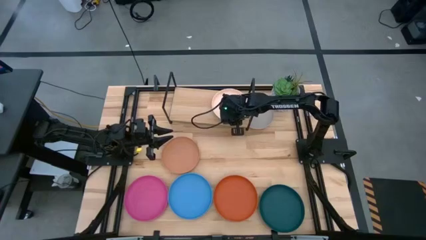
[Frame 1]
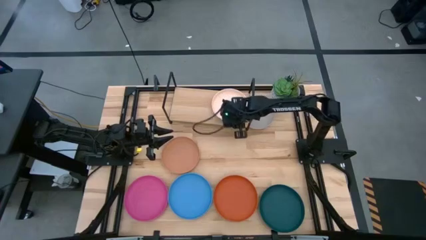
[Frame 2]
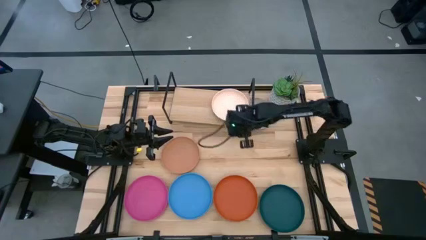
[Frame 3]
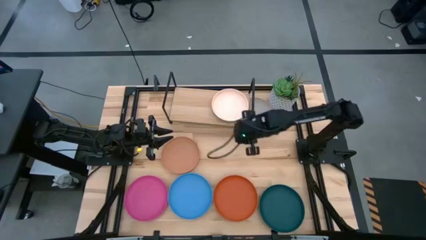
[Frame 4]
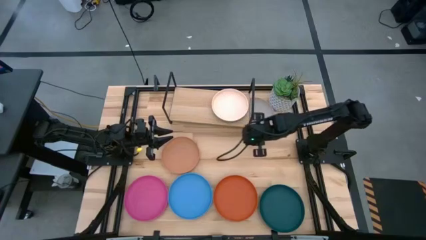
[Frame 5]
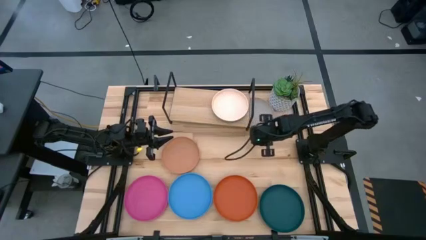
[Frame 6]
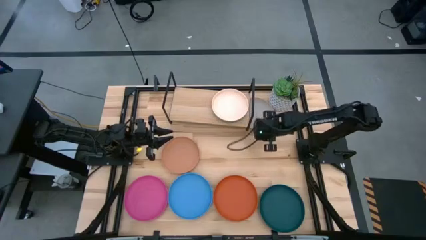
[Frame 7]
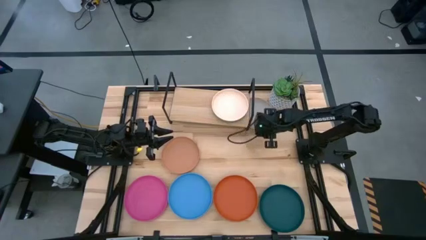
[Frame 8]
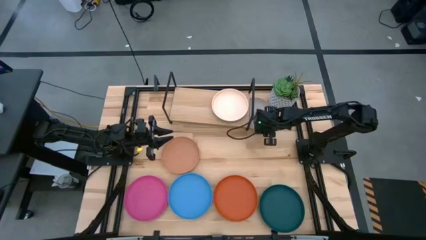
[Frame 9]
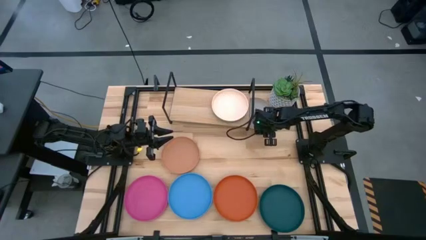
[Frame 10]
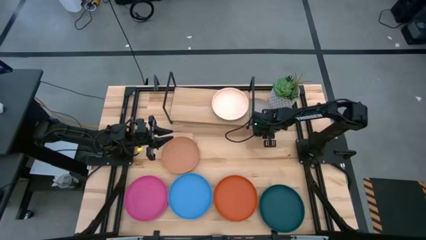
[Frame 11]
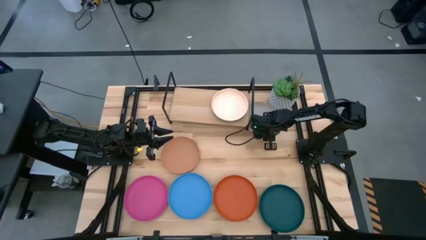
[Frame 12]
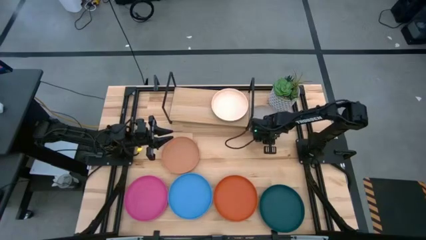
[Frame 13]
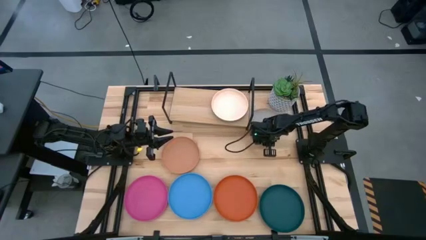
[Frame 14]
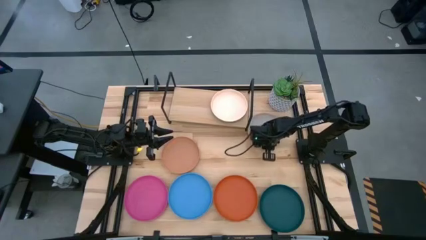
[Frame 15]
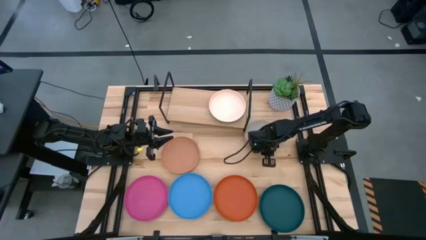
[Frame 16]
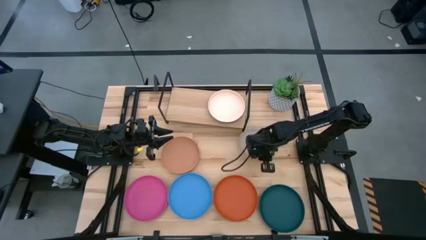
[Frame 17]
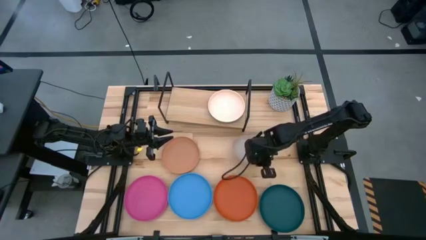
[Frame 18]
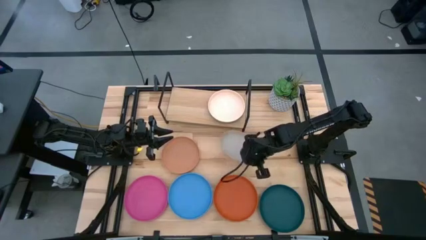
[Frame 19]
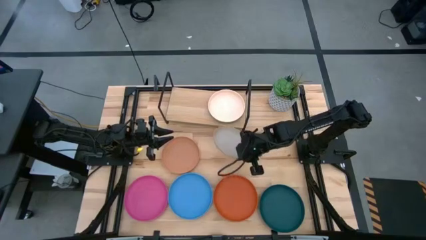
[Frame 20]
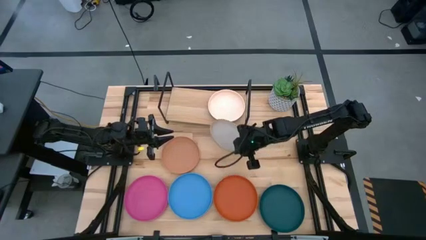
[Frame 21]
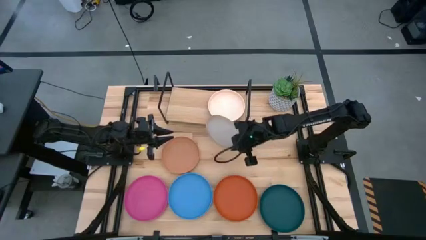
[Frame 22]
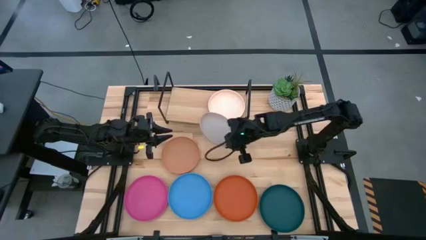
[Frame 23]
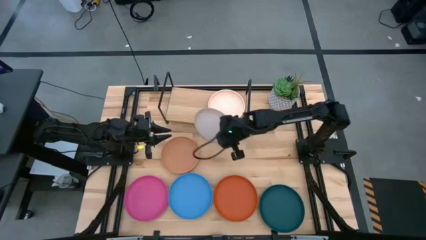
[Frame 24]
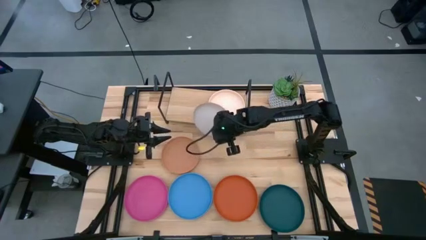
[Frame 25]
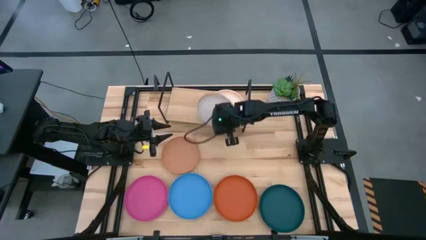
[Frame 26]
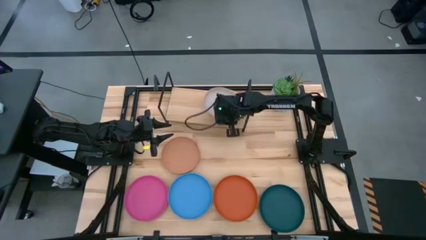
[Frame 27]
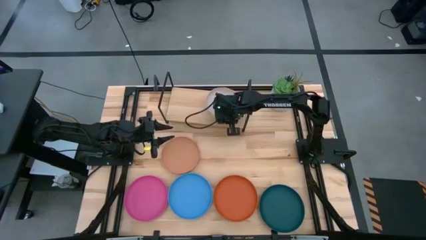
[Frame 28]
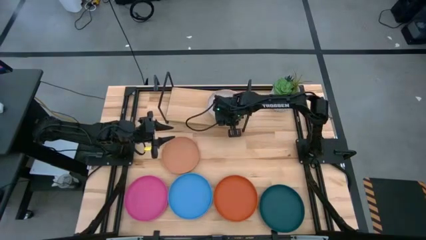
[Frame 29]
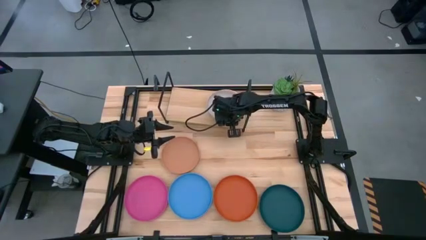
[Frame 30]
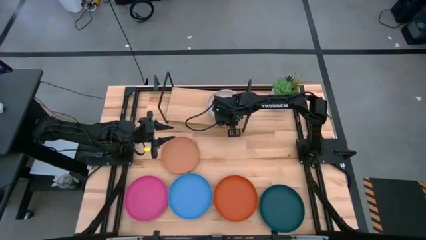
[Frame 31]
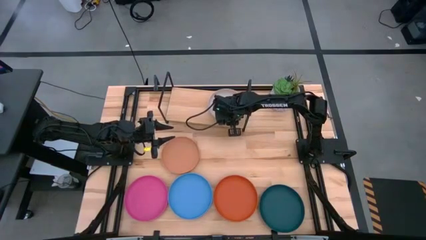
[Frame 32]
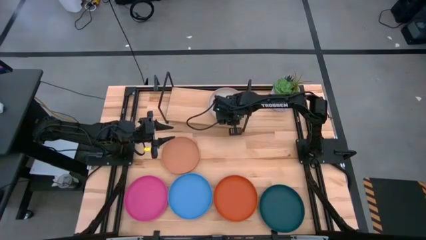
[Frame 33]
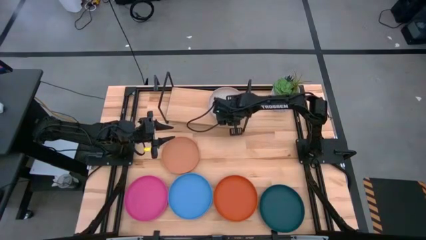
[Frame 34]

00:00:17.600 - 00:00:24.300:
Task: Place and stack plates onto a shelf
Stack the gray plate on top of the light orange plate on the shelf

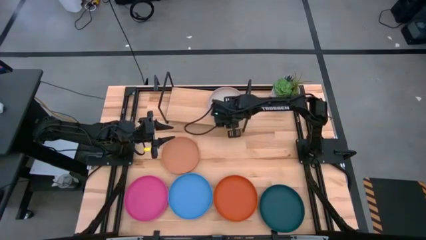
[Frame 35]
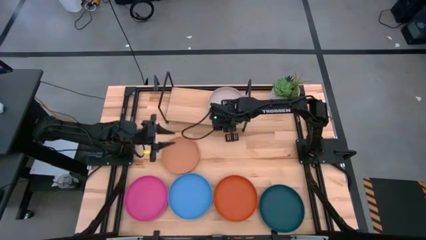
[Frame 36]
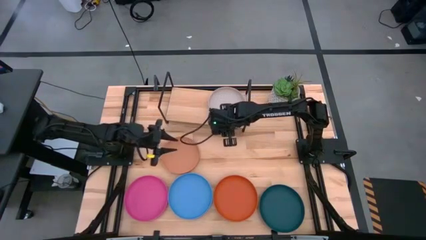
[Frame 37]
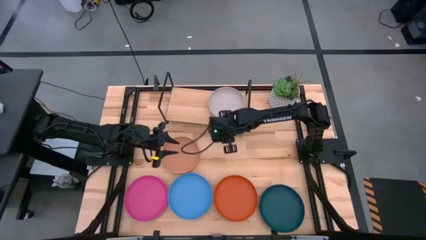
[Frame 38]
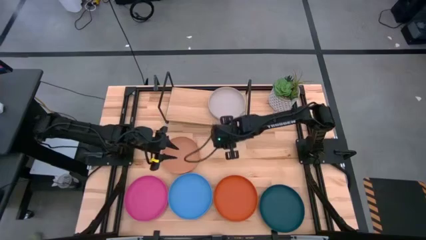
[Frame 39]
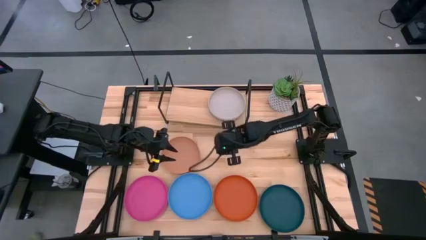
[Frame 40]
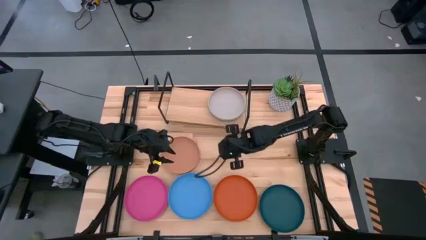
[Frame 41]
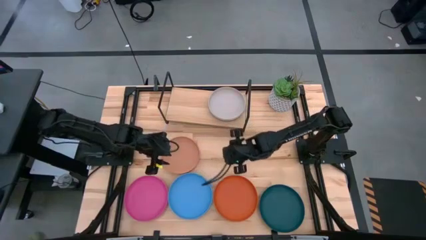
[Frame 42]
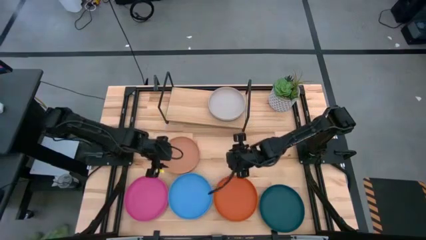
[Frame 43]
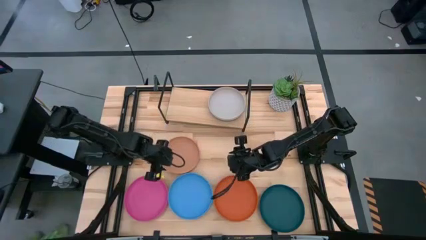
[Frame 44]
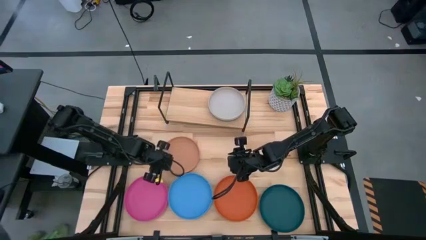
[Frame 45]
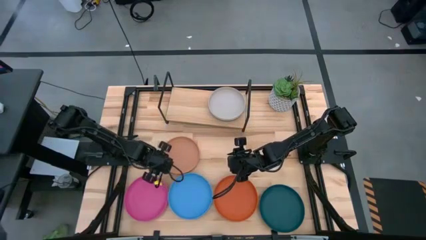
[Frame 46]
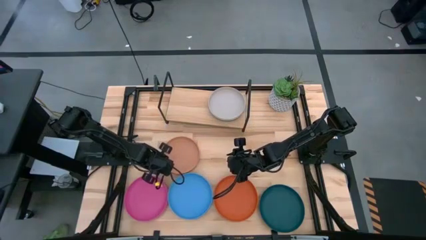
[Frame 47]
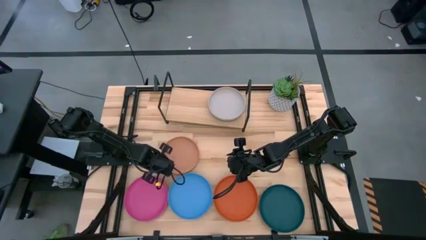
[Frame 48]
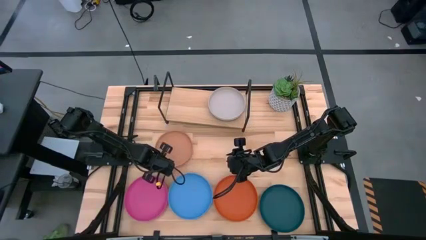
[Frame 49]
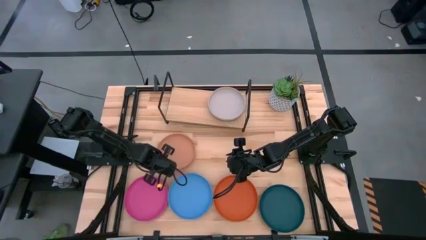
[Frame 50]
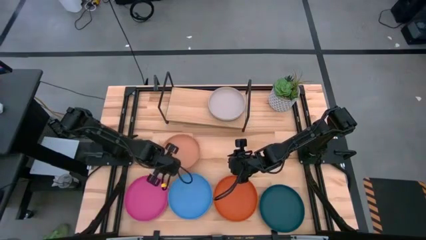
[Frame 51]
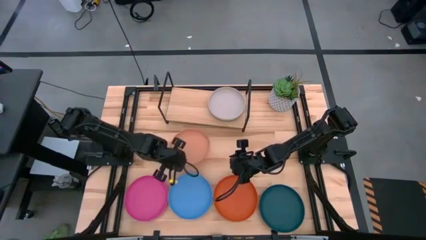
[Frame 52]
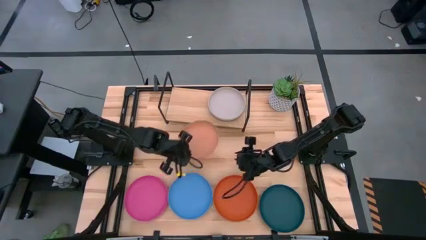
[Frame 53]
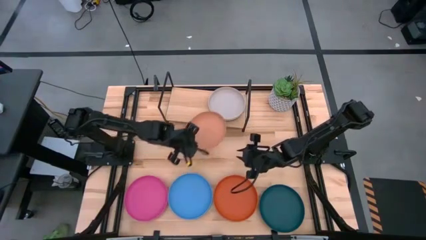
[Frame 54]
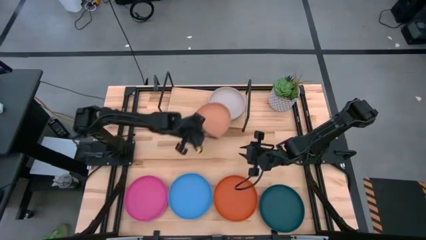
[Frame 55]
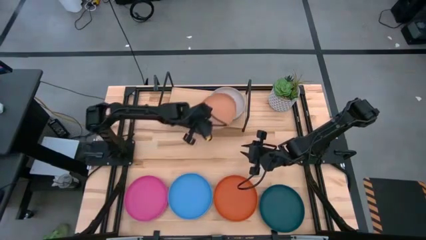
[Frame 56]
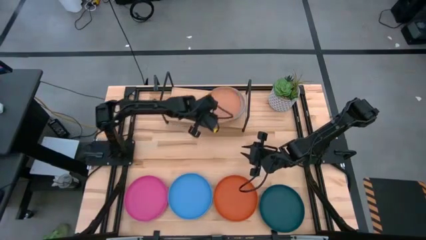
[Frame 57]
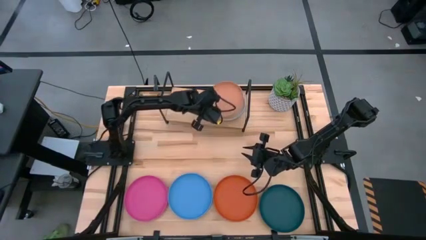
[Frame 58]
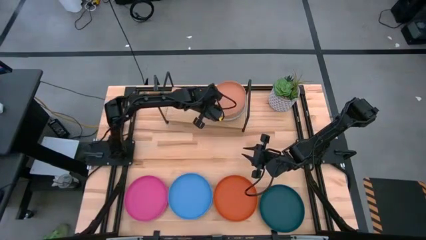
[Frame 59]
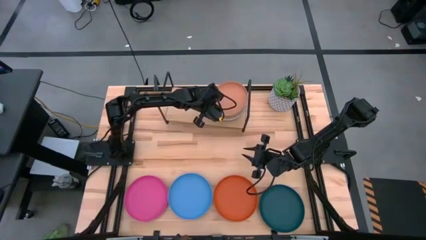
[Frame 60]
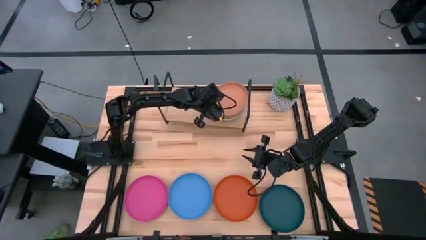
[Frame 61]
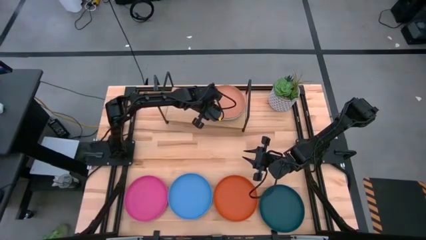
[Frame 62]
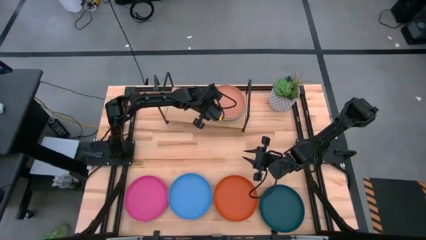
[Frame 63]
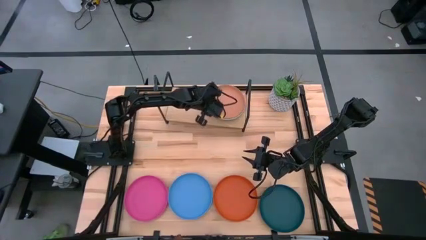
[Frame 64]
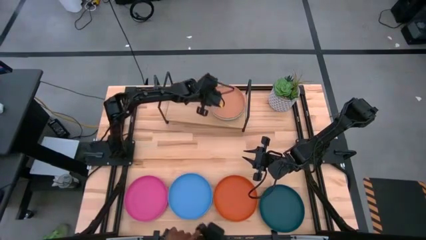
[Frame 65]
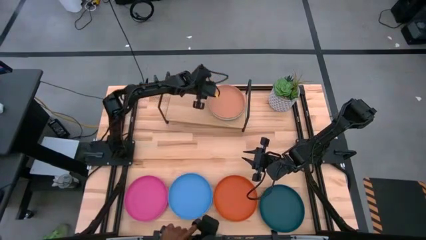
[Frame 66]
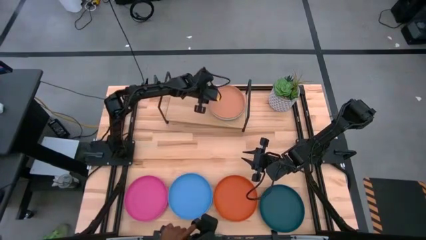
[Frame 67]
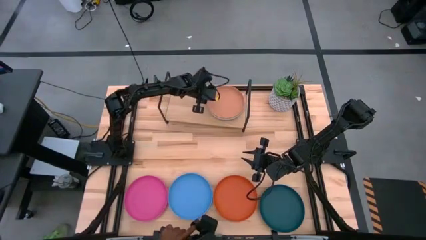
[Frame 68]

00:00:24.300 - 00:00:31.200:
Stack the brown plate on top of the gray plate on the shelf

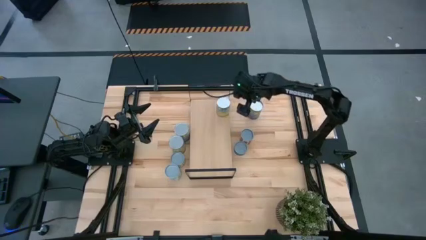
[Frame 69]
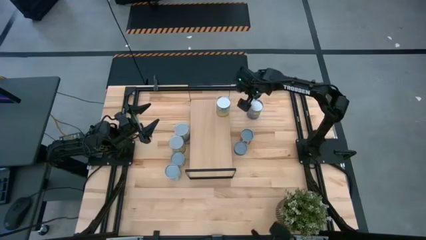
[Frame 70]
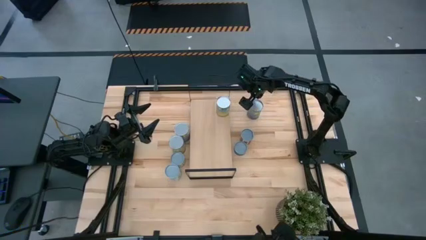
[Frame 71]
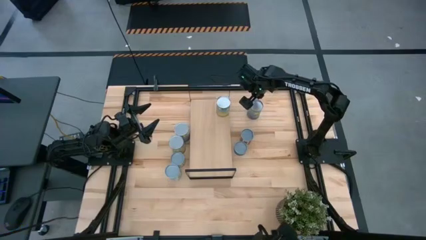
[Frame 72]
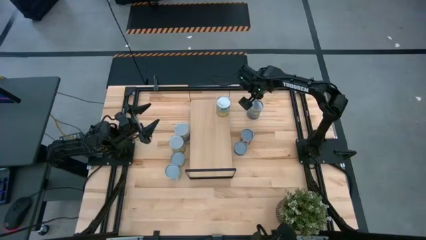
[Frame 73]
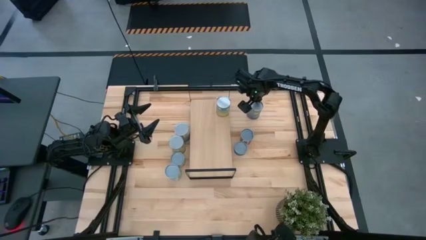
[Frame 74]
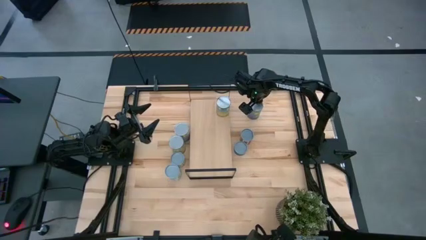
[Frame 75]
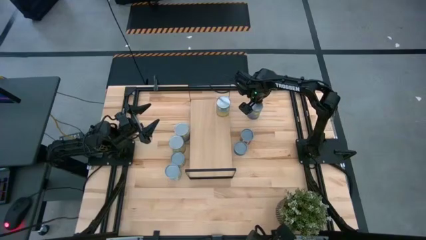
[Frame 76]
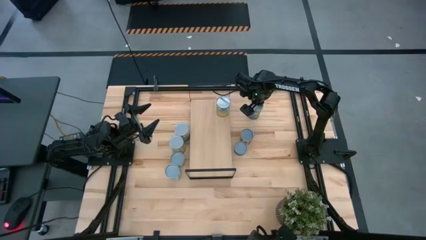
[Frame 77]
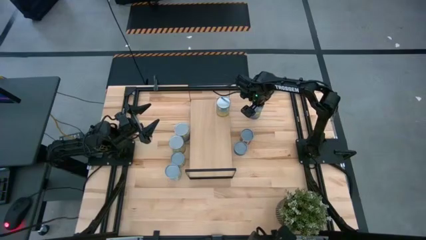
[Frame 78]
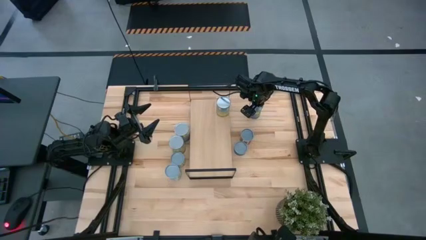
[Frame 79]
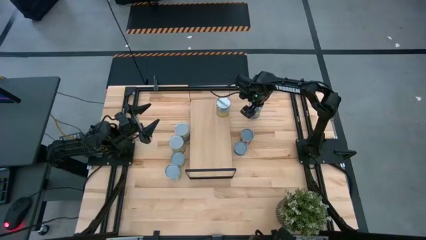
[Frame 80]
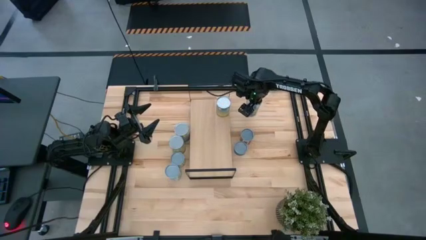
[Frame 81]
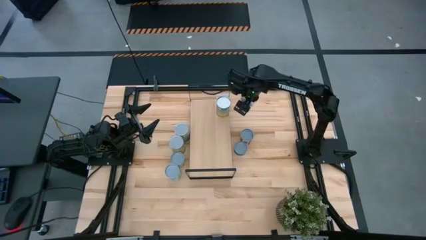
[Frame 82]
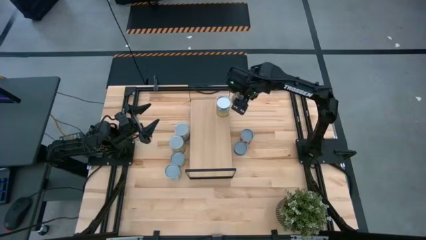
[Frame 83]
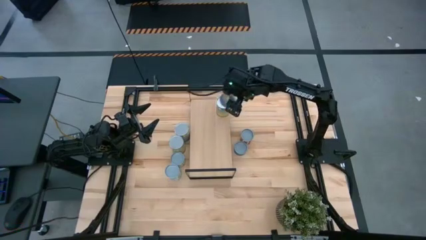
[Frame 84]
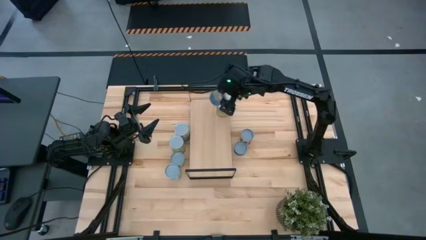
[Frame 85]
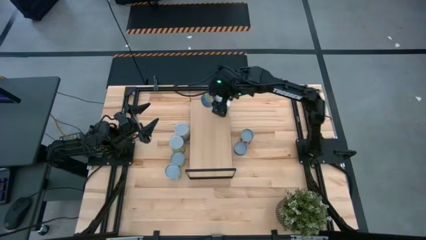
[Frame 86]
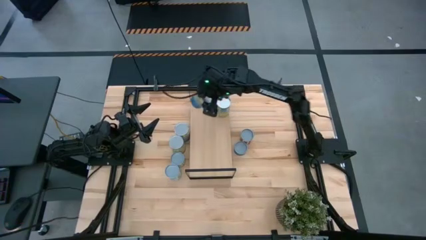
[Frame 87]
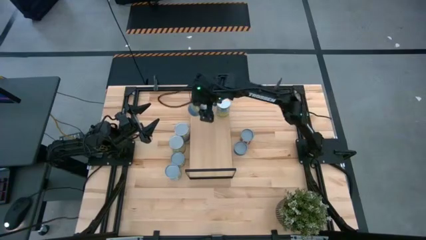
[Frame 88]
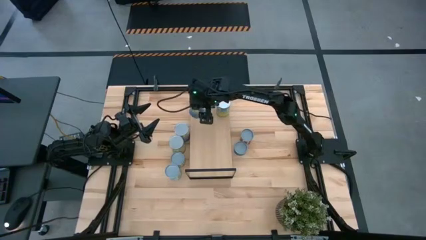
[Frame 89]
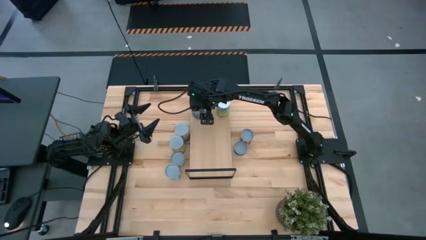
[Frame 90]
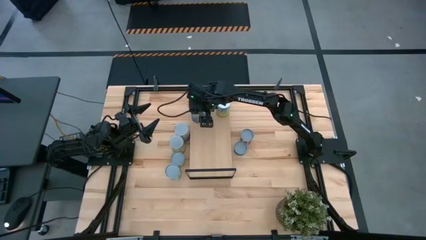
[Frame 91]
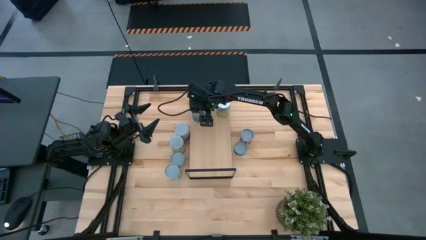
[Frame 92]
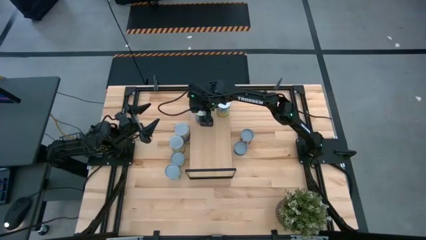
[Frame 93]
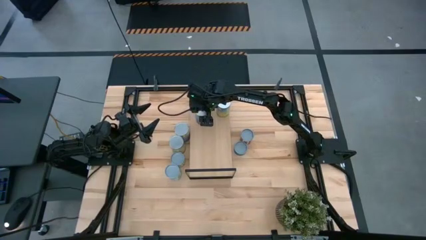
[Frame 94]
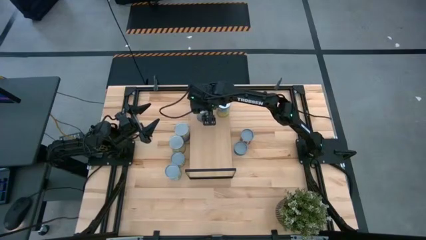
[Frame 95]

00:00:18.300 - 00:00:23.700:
Task: Pick and place cans onto a shelf
Put the canned peas onto the shelf
